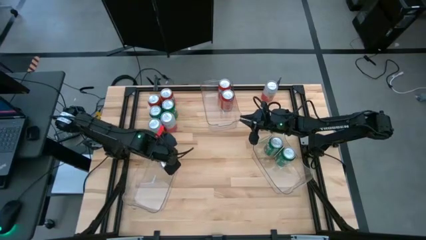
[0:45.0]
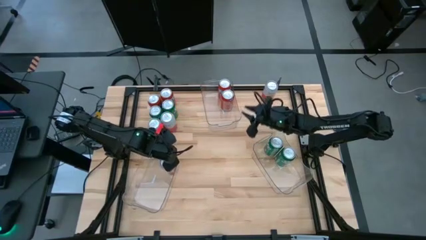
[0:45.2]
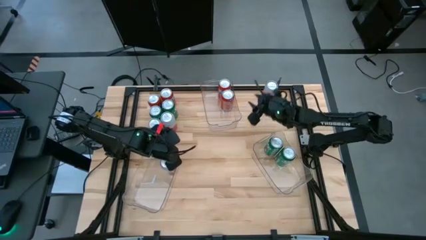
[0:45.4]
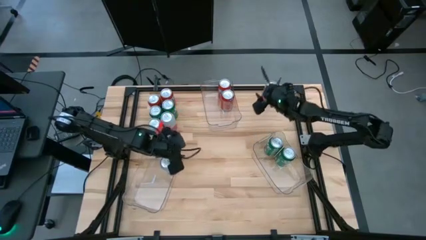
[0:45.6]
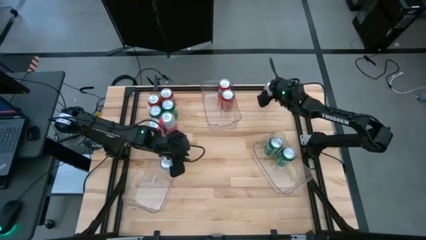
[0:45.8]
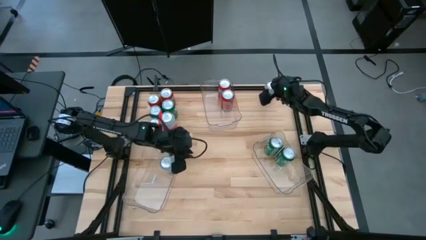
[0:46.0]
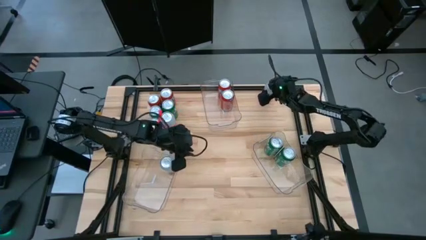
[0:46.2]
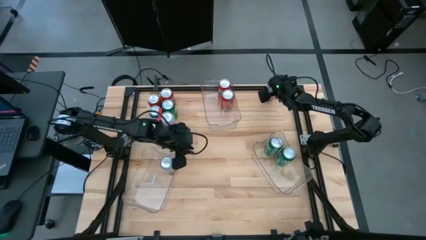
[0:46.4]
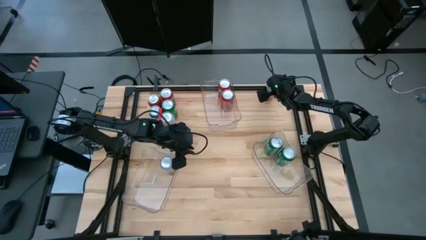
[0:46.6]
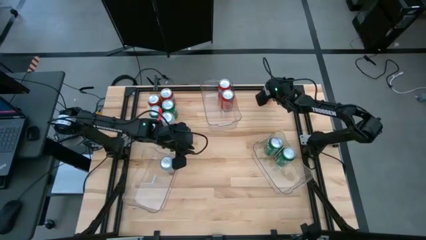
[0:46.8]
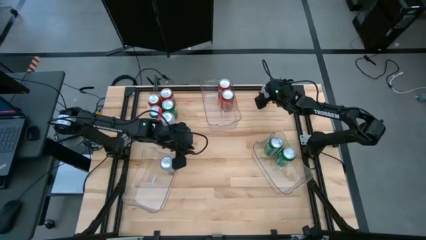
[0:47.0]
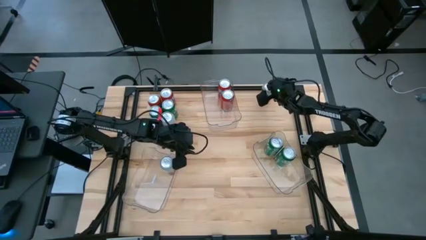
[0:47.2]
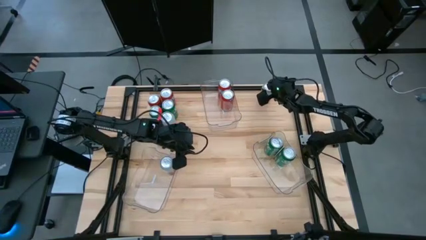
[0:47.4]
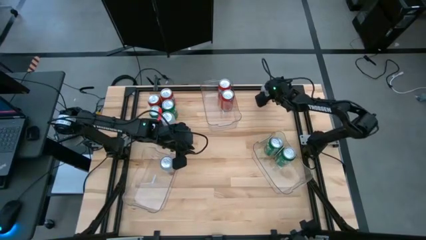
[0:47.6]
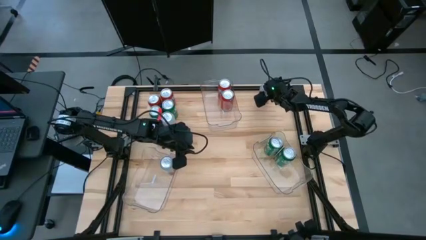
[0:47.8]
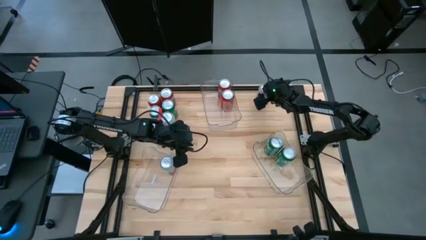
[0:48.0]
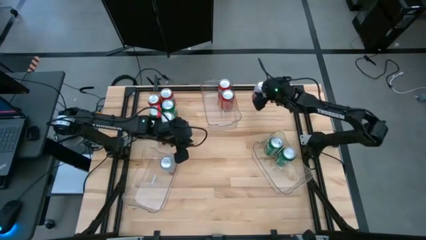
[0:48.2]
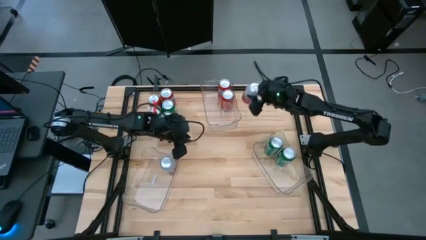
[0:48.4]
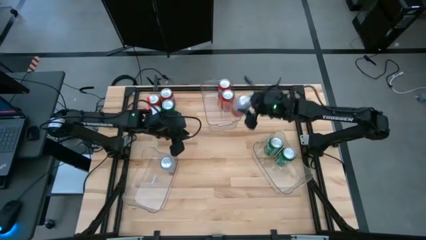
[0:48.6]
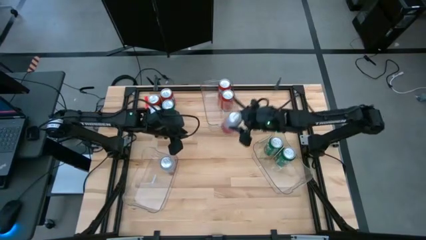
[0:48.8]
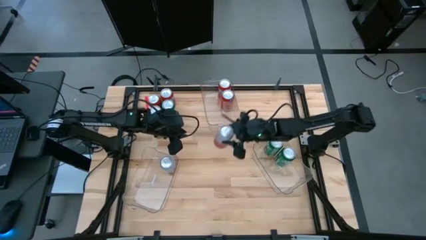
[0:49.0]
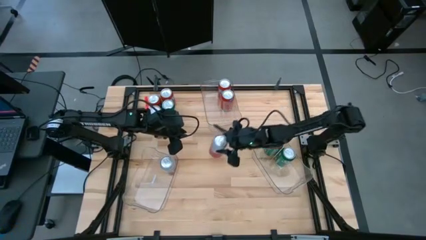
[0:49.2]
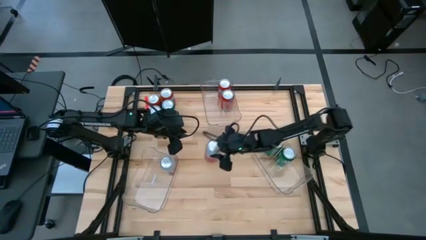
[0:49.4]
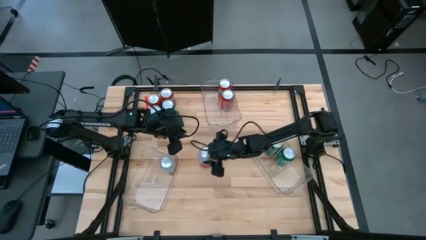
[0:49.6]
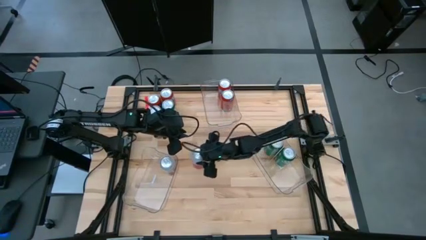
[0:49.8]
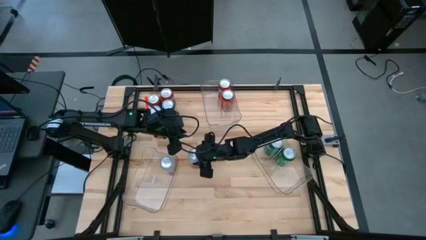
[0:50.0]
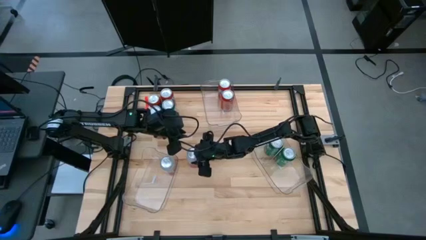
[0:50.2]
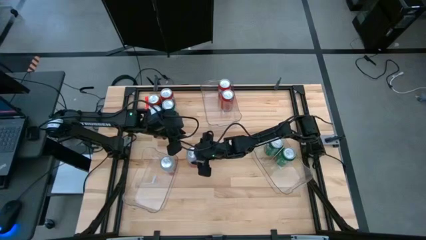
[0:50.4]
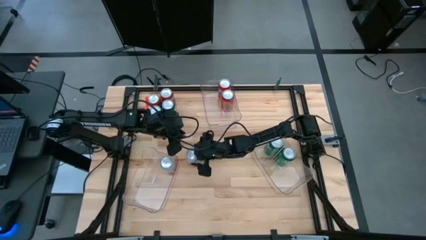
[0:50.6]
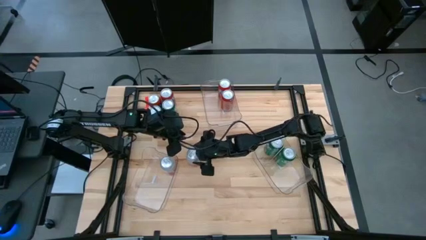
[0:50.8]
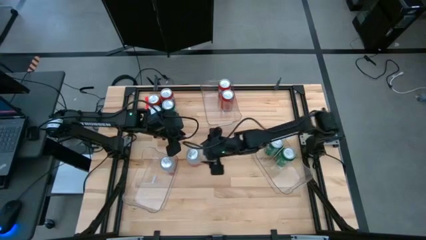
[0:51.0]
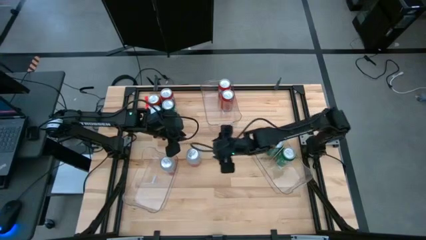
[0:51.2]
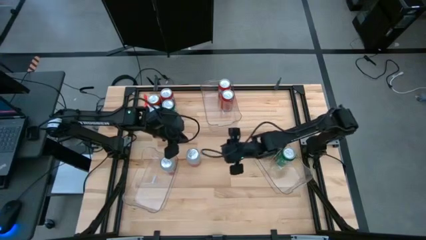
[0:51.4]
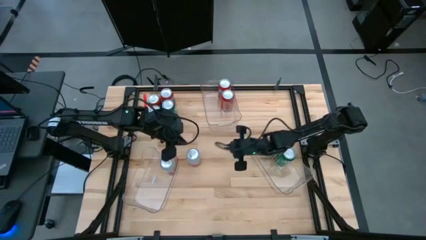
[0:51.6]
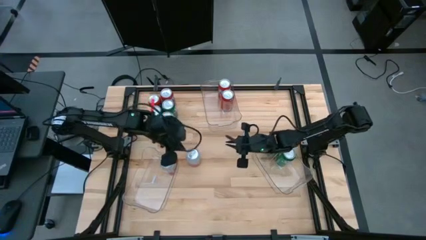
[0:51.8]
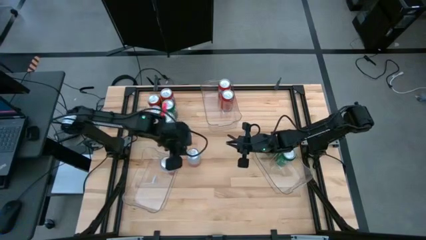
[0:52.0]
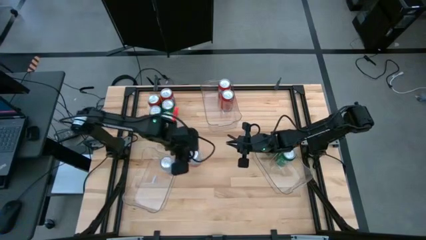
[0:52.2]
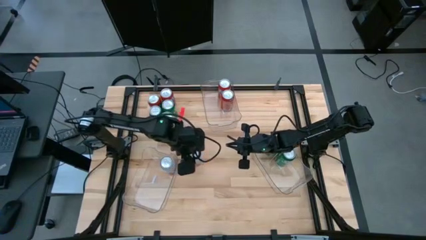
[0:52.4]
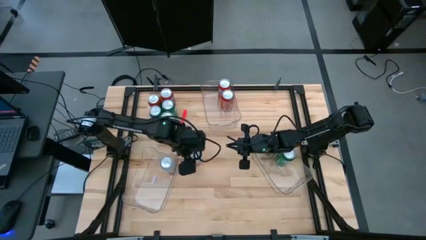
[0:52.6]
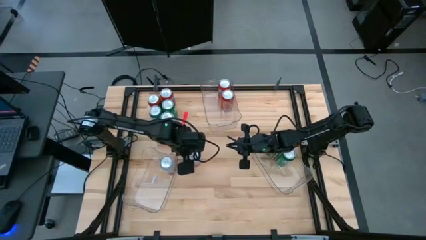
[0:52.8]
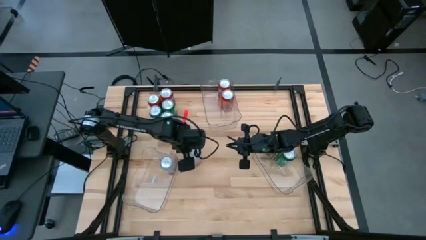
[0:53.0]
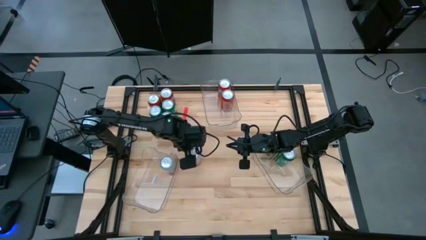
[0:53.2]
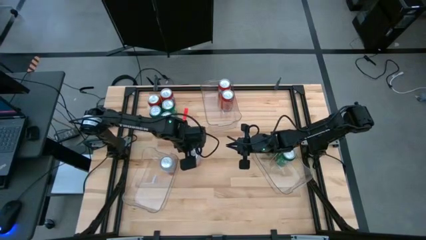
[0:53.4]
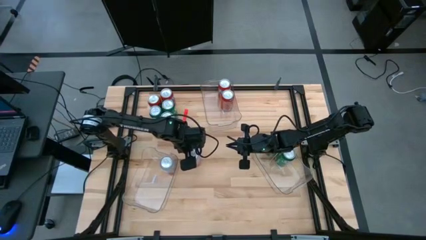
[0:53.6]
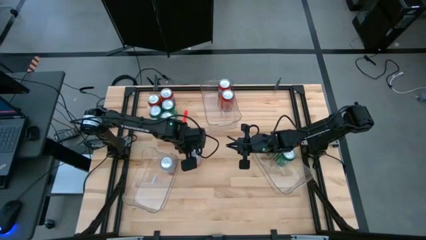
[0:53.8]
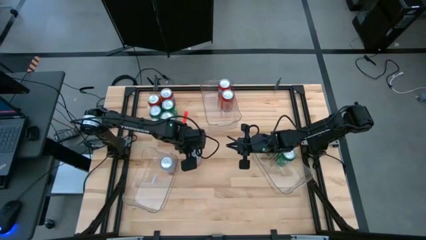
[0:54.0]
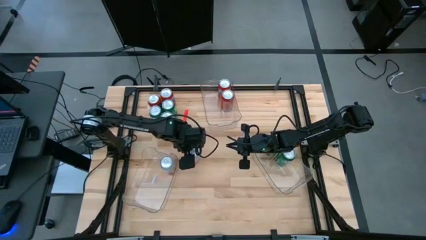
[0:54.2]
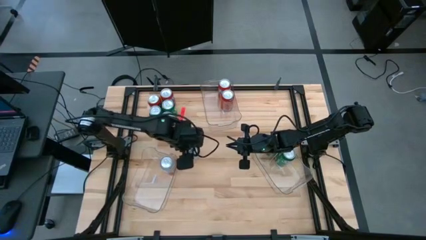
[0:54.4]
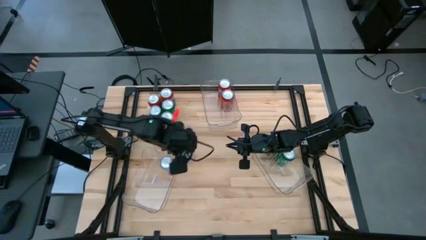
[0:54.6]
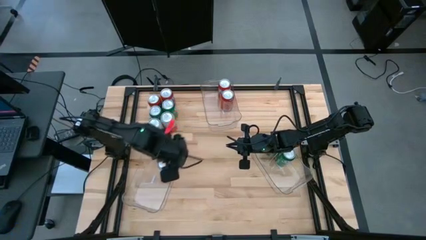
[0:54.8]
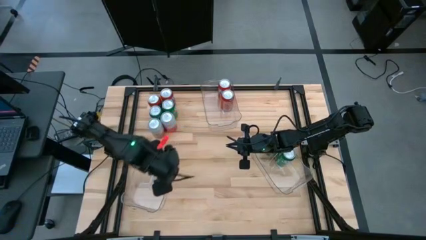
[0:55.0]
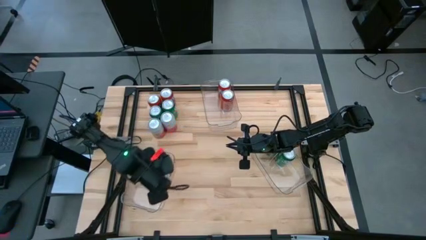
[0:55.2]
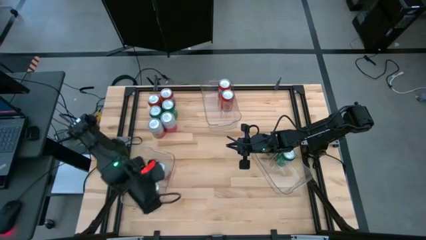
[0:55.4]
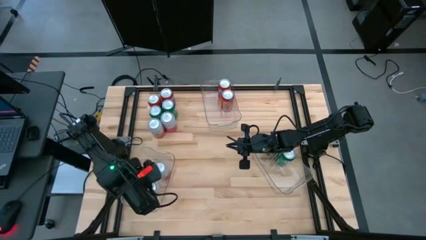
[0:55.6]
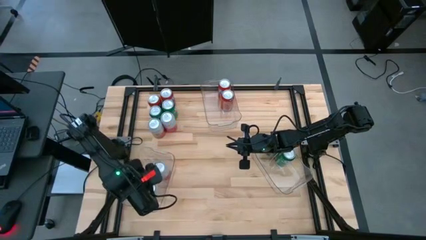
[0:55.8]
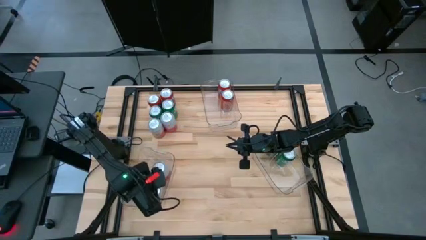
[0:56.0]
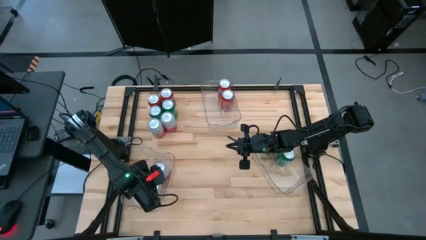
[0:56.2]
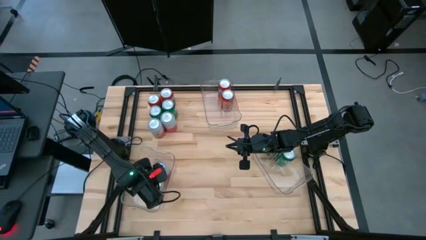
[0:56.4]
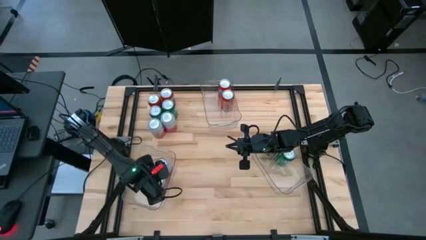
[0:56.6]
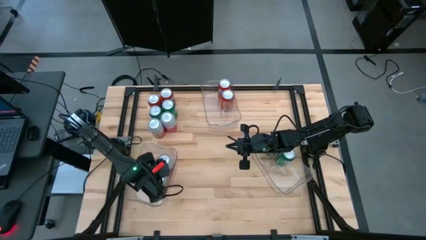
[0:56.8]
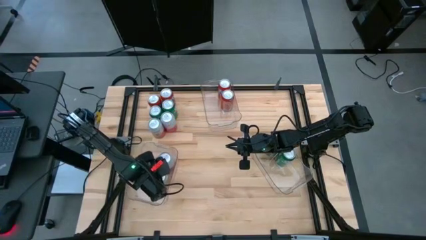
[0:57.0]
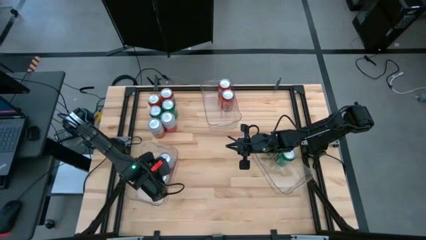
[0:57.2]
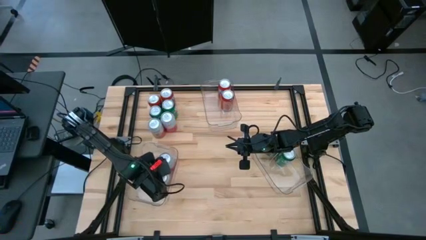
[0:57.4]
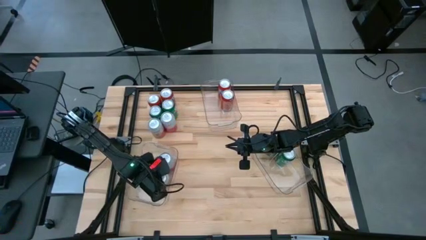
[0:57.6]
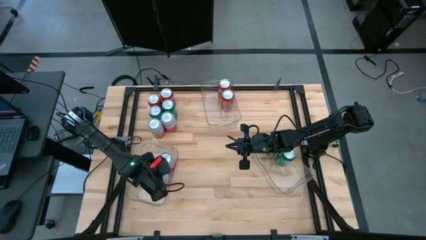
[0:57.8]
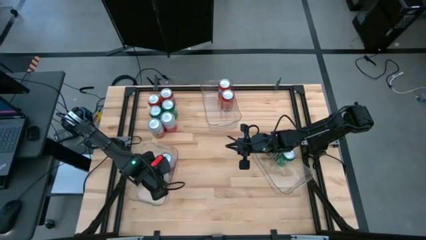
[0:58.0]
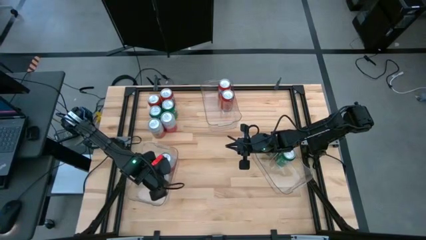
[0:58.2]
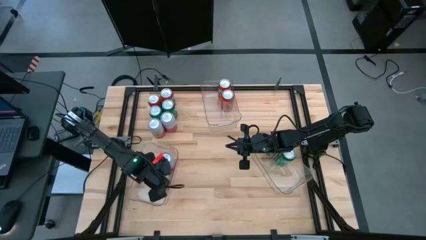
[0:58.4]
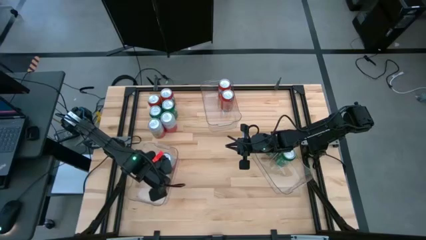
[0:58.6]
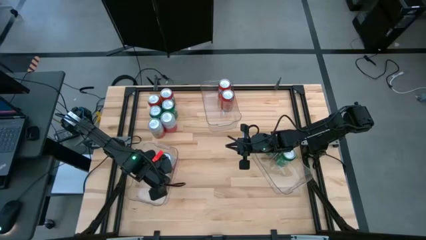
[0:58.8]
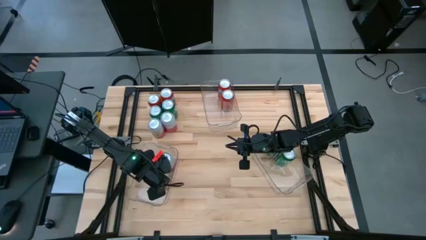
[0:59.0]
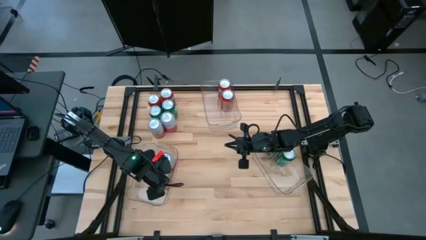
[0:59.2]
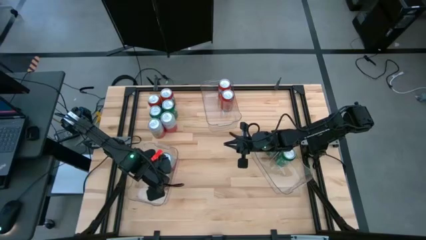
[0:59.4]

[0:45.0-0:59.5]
Task: Sort soda cans
Put the white soda can into the bottom left transparent bin

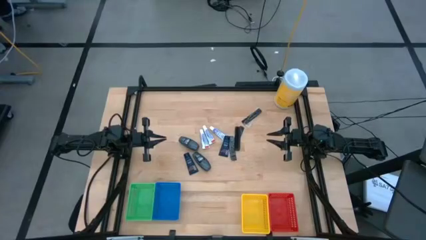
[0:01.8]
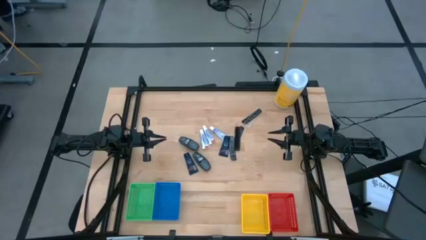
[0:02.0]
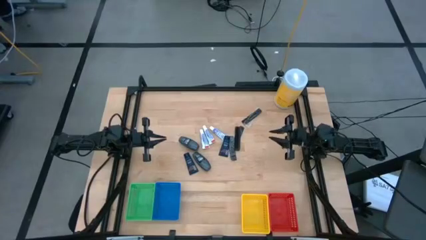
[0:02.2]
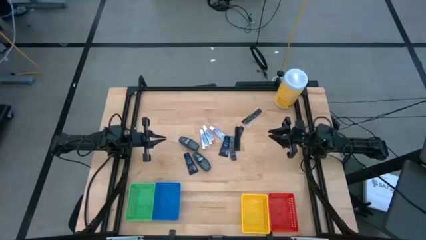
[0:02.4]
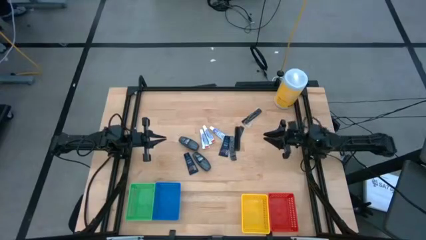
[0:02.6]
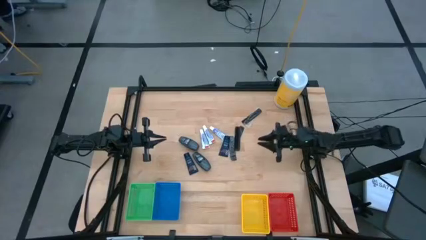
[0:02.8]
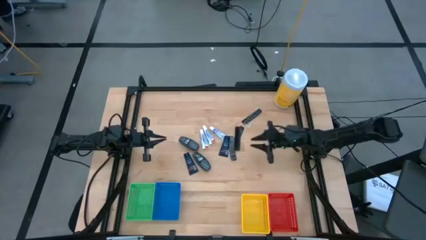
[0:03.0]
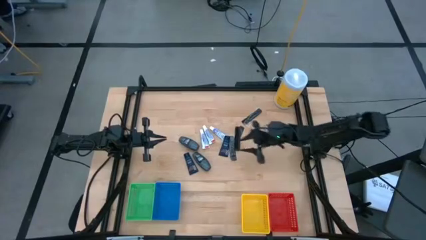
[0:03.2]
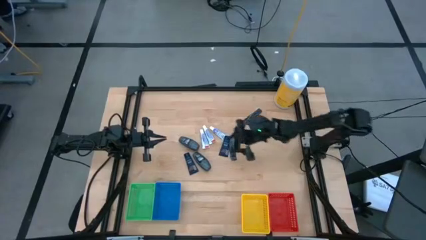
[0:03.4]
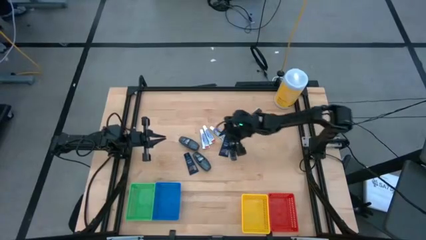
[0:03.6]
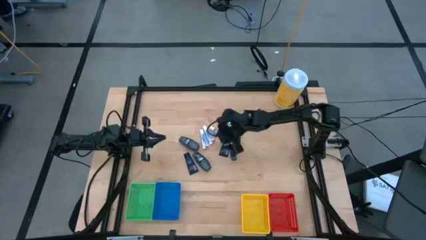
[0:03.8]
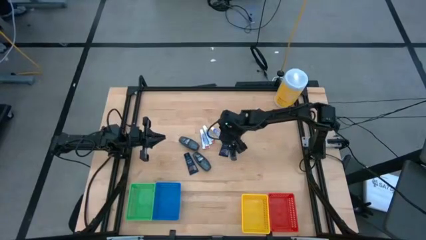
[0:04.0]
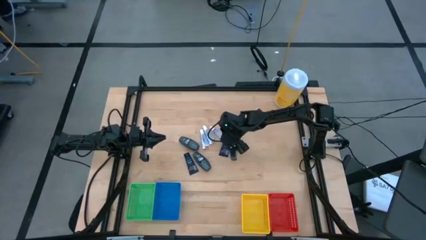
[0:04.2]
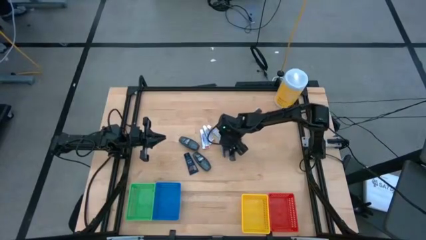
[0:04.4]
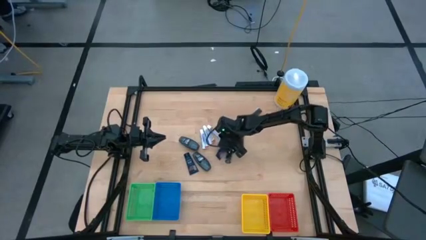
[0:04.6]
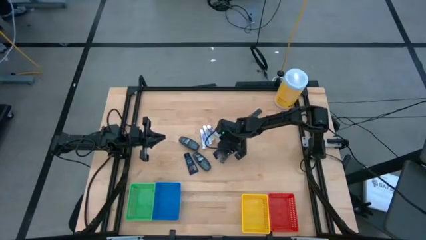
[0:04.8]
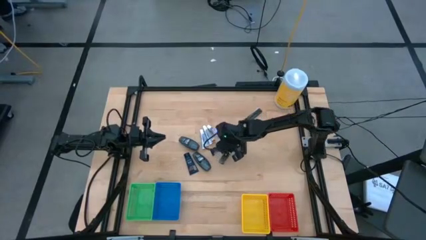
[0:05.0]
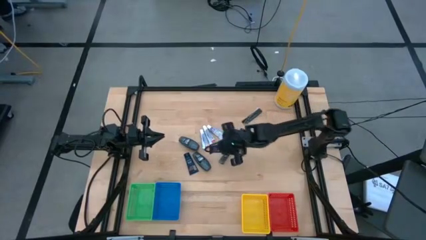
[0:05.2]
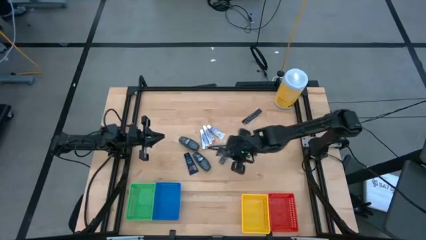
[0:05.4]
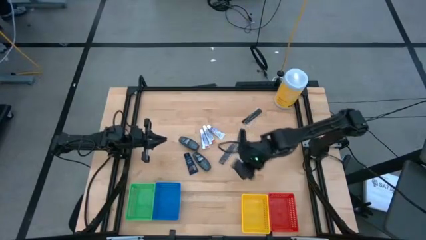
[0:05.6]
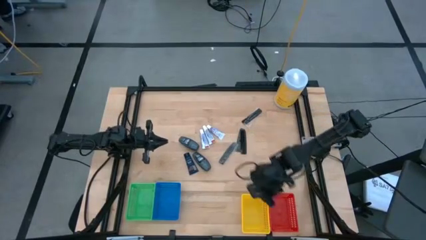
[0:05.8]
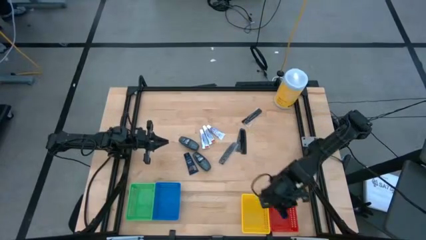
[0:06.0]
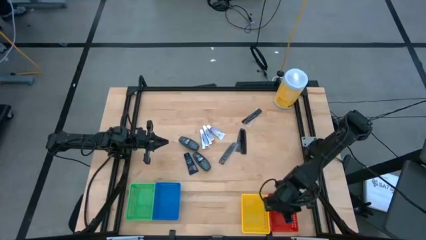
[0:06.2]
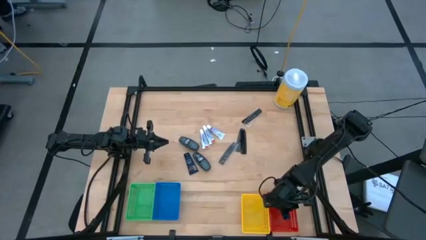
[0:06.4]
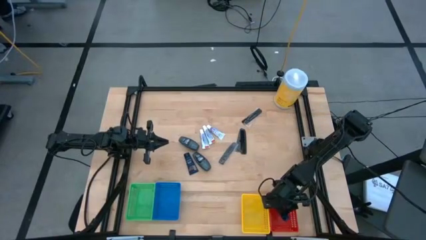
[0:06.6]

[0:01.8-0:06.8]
Task: Pick & Place Travel size toiletries
Put the blue shave cream into the orange bin
